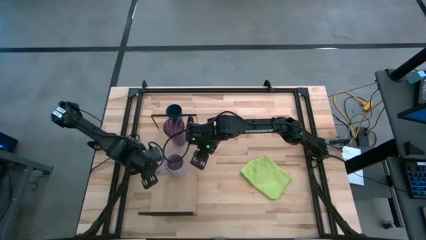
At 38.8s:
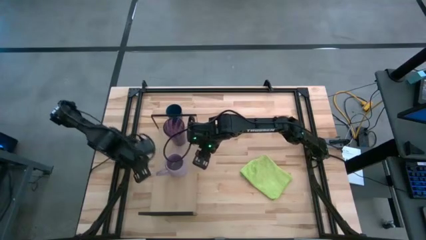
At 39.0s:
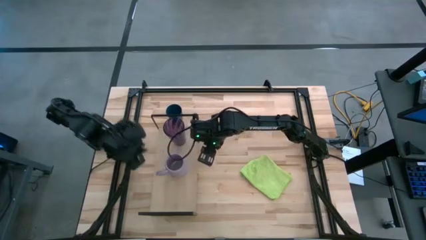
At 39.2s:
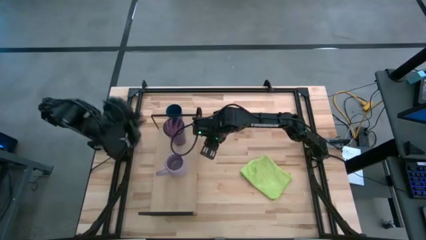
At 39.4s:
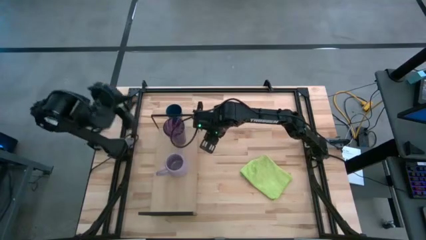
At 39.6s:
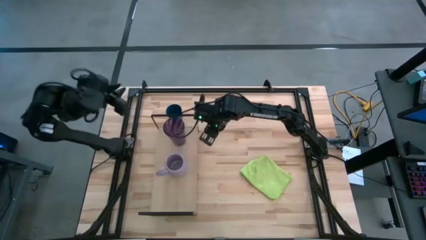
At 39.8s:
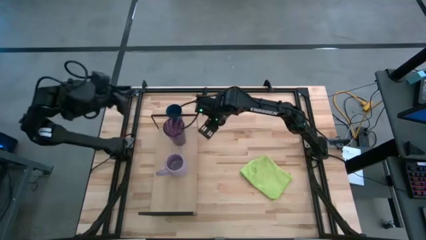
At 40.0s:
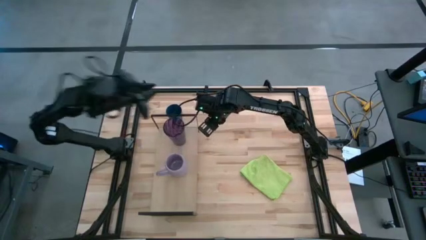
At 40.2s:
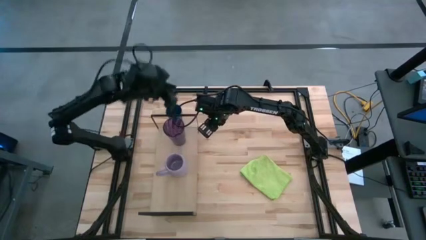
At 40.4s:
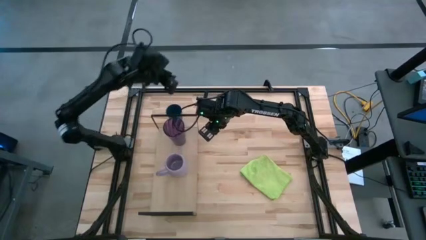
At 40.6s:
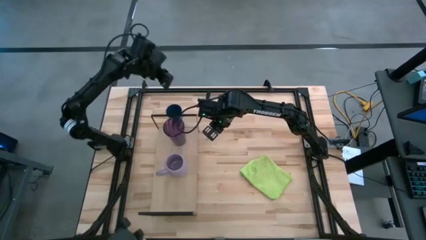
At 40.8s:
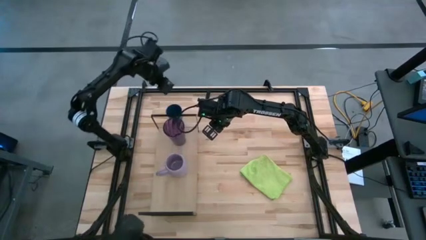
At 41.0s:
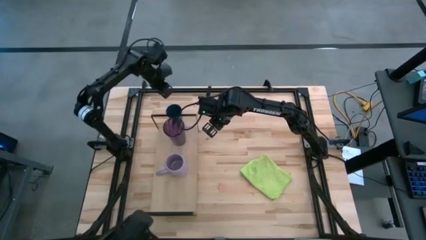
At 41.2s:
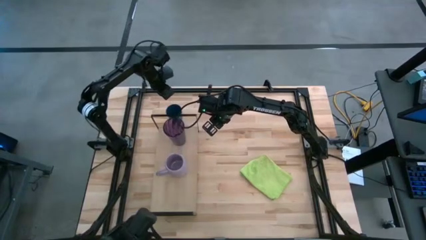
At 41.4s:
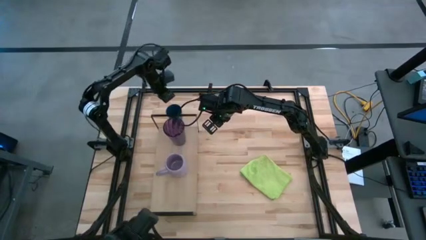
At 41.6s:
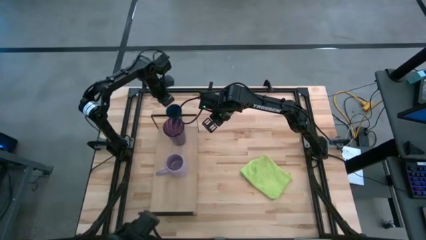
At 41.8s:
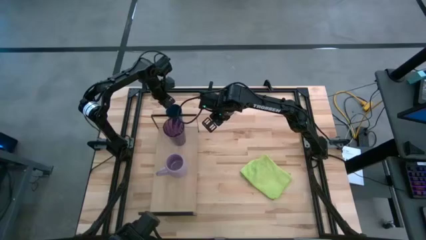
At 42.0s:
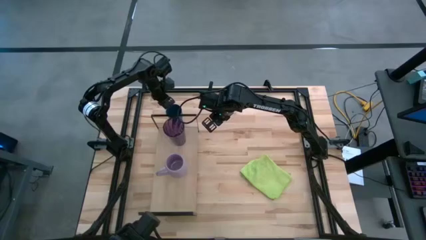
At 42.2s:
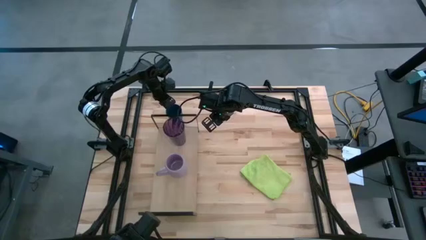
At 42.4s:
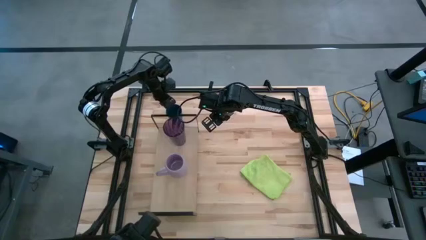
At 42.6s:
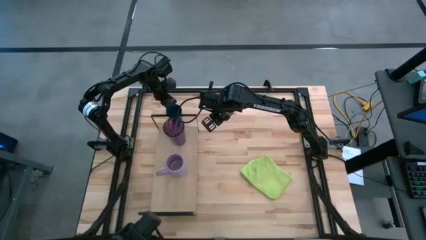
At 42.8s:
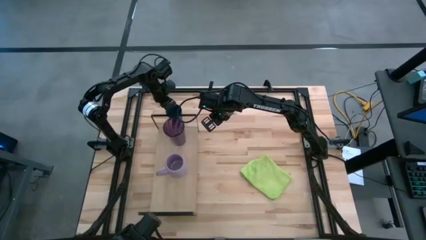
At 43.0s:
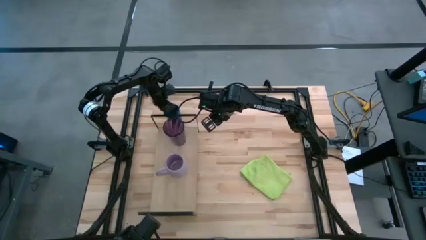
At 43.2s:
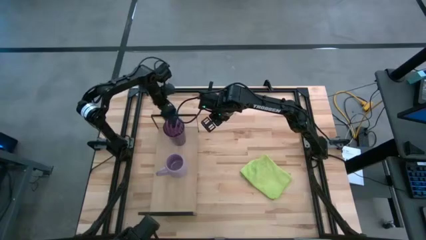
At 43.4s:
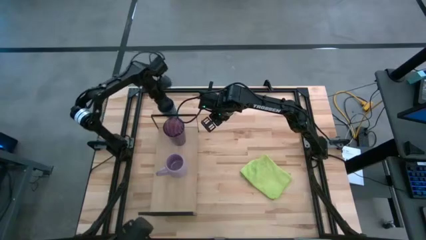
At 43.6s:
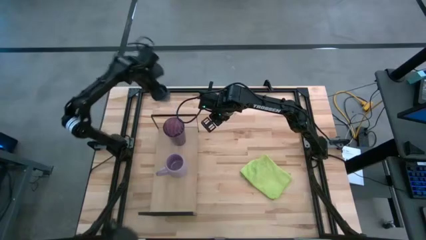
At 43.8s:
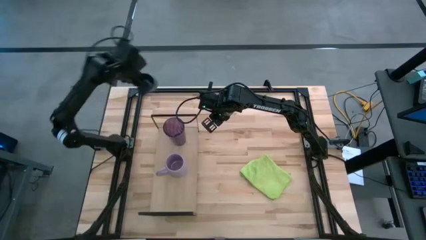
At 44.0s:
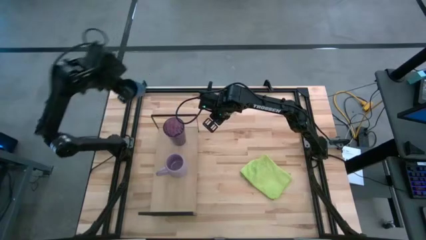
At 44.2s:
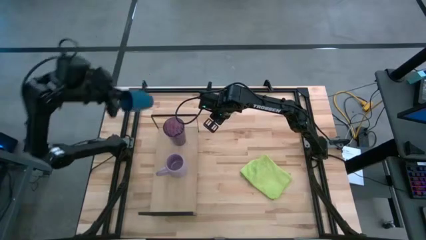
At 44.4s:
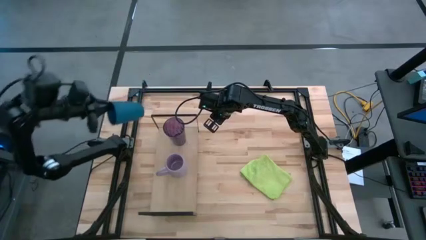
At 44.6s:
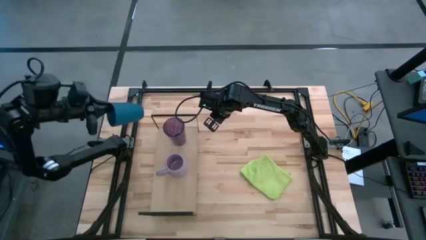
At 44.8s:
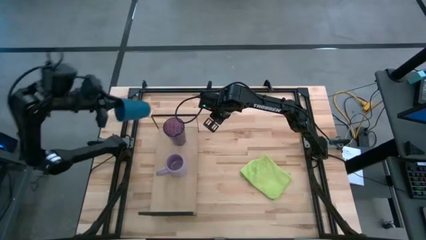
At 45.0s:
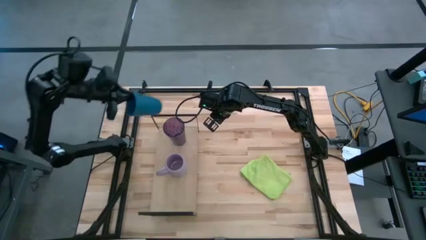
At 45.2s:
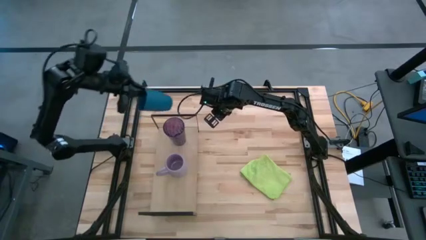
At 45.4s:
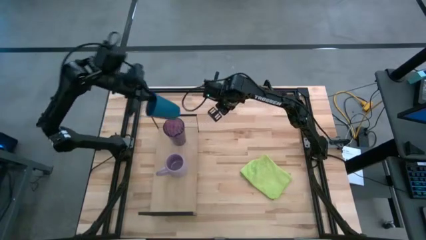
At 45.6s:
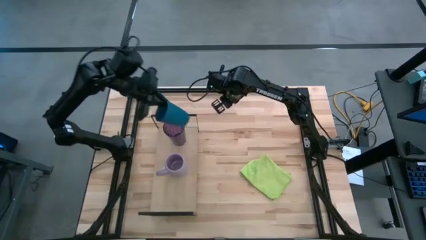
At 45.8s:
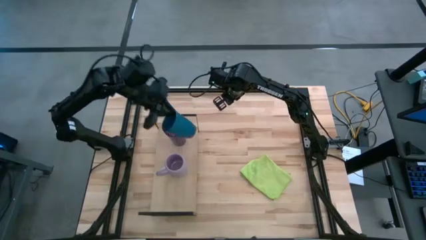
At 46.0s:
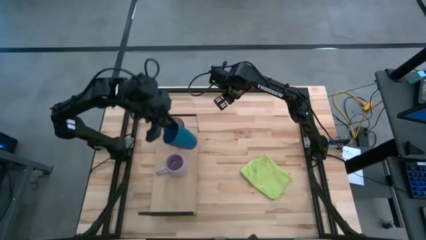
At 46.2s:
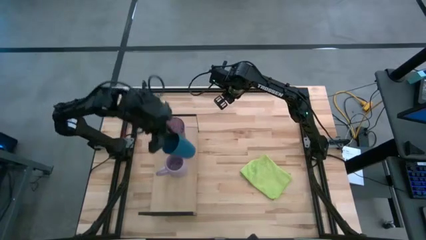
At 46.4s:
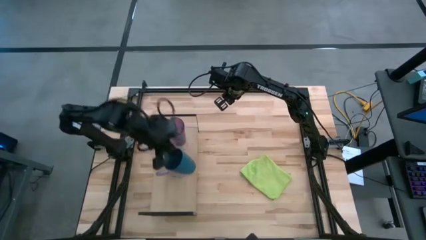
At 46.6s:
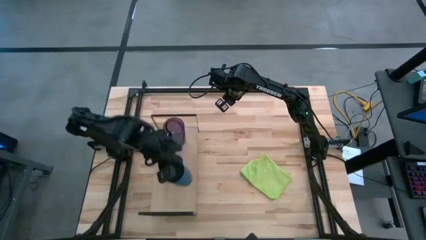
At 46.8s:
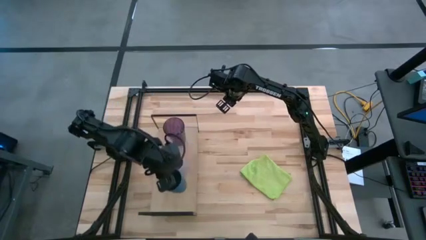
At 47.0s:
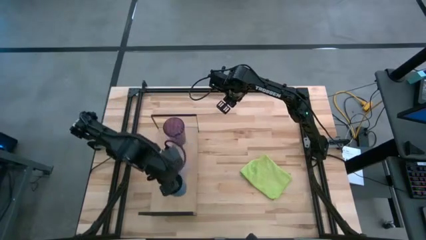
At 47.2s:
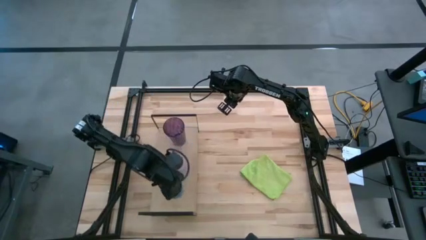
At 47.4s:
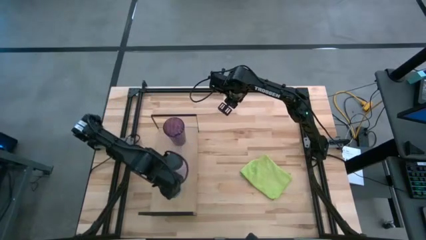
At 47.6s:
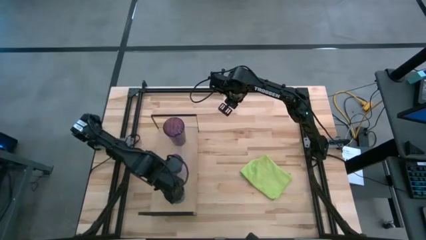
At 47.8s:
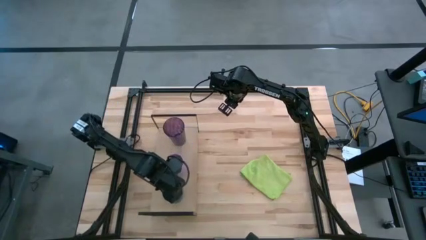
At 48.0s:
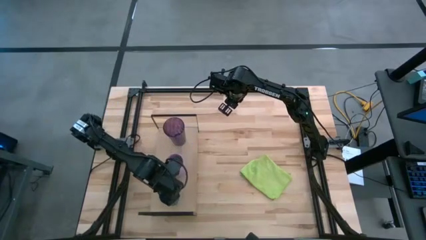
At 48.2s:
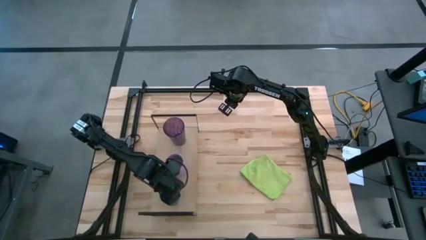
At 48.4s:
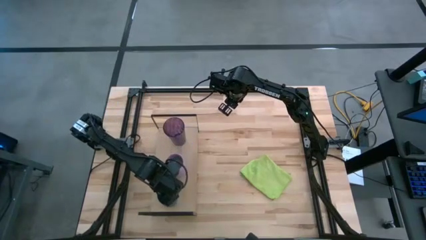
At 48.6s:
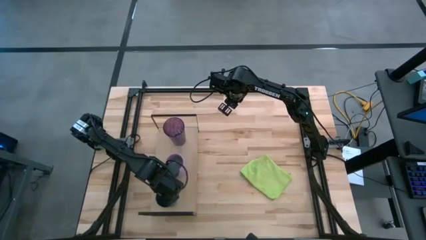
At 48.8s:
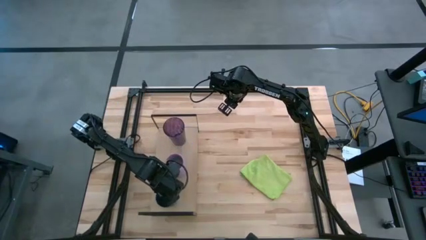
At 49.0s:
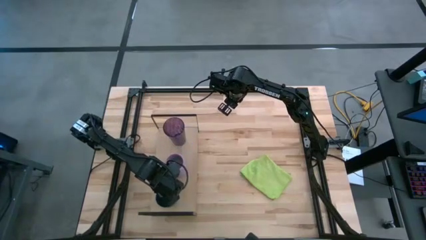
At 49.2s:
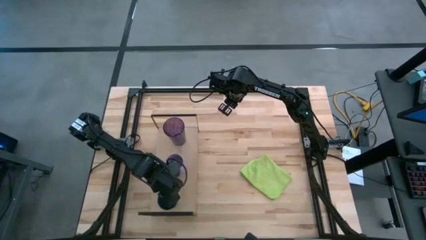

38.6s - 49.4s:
Task: Stack small to large cups/mugs on shelf
Put blue cup on the shelf
